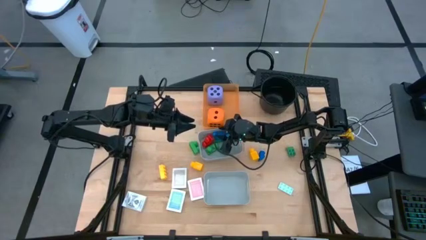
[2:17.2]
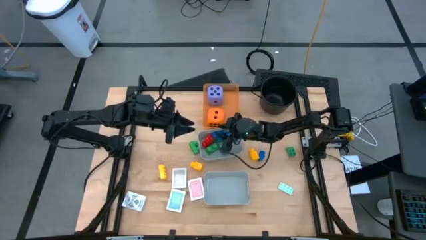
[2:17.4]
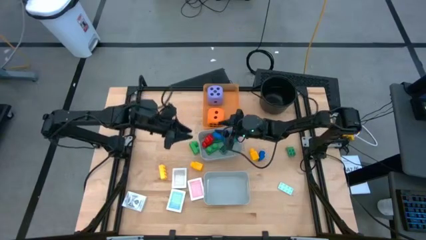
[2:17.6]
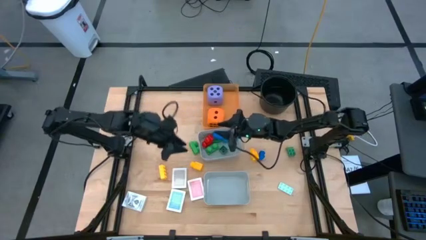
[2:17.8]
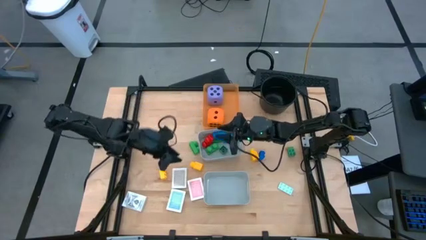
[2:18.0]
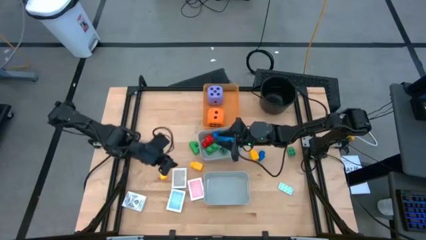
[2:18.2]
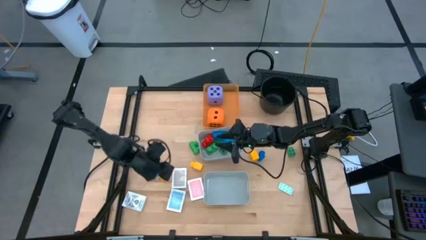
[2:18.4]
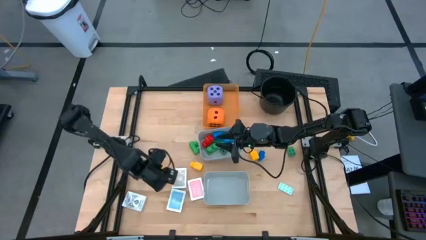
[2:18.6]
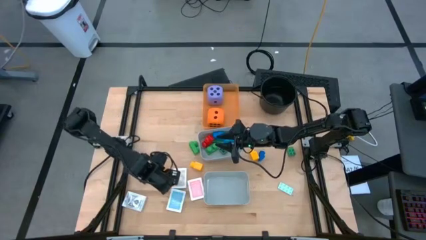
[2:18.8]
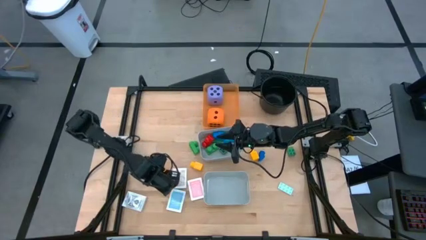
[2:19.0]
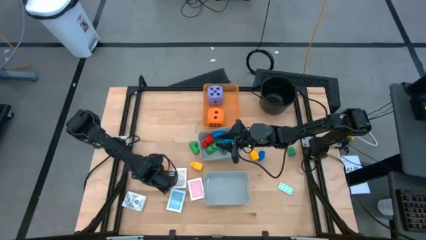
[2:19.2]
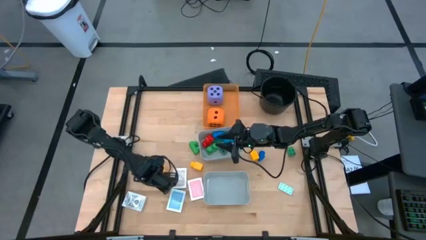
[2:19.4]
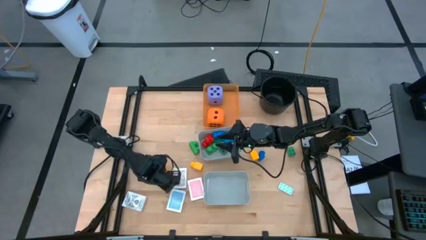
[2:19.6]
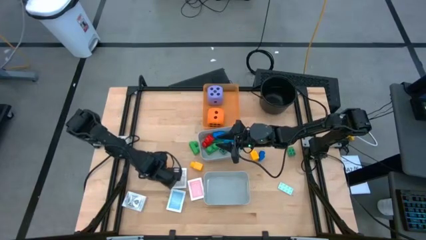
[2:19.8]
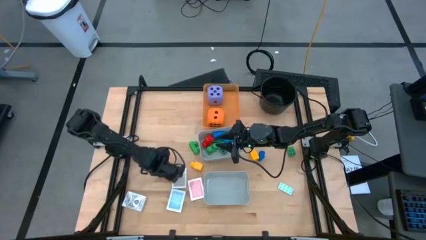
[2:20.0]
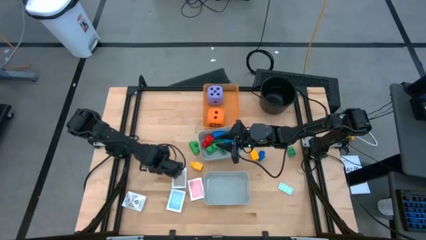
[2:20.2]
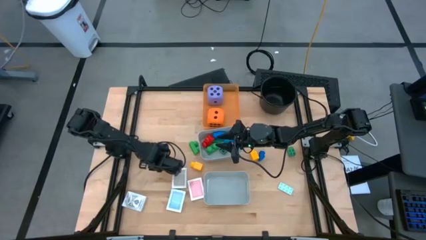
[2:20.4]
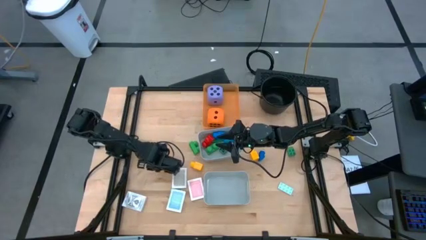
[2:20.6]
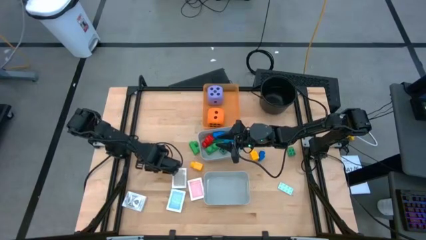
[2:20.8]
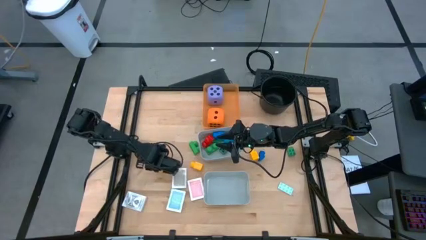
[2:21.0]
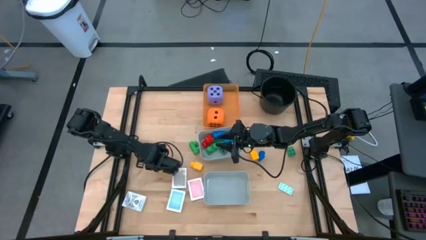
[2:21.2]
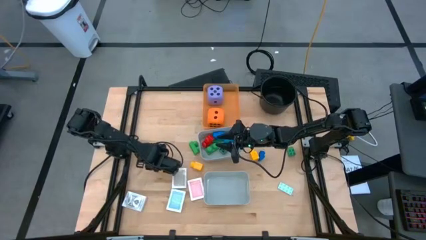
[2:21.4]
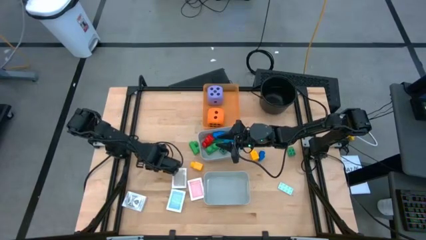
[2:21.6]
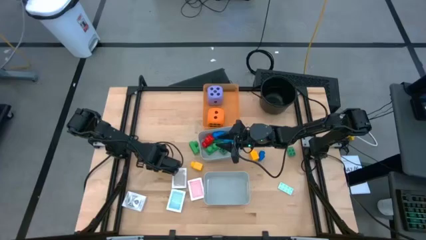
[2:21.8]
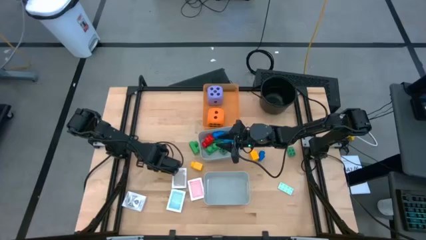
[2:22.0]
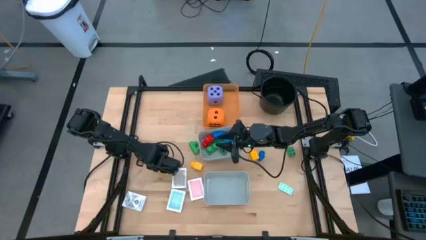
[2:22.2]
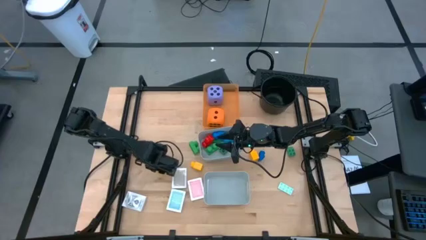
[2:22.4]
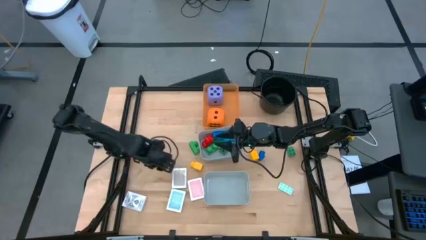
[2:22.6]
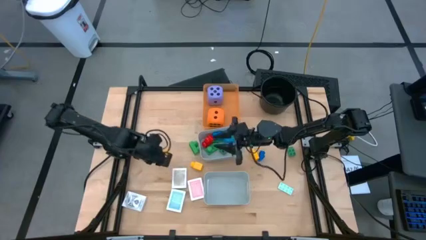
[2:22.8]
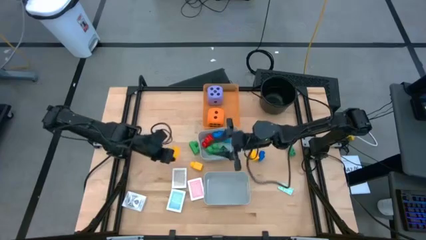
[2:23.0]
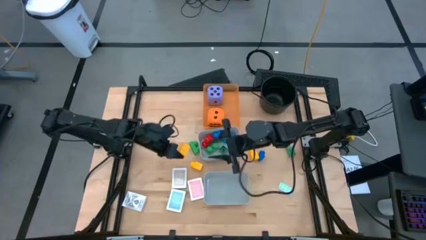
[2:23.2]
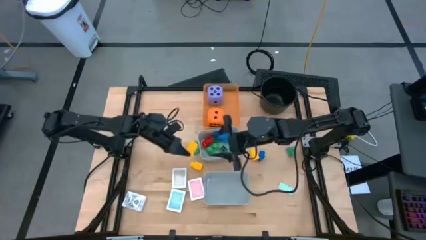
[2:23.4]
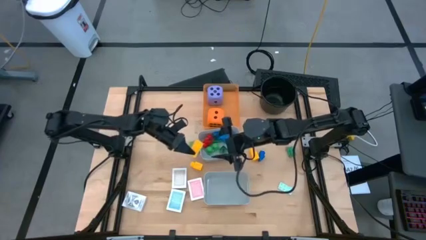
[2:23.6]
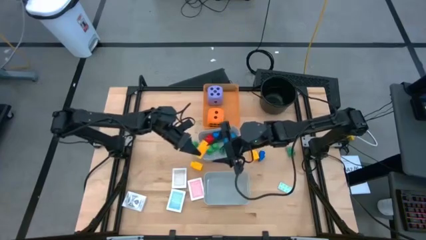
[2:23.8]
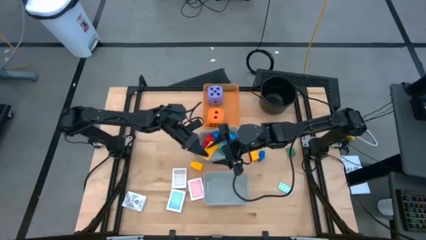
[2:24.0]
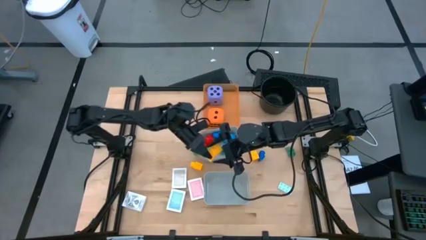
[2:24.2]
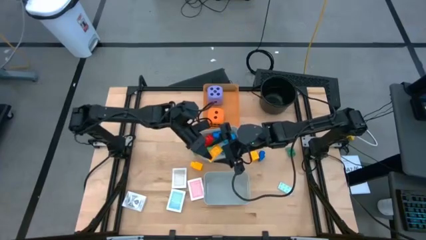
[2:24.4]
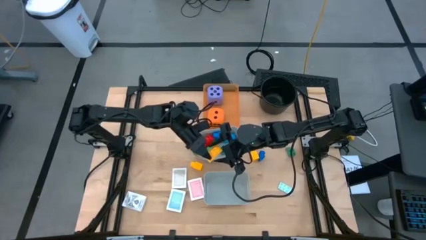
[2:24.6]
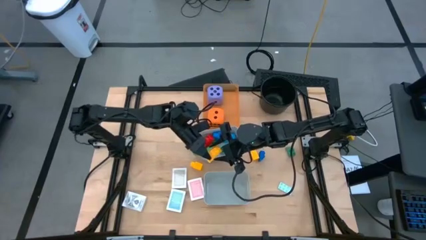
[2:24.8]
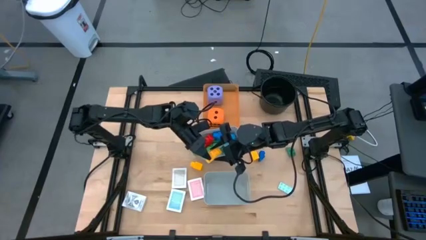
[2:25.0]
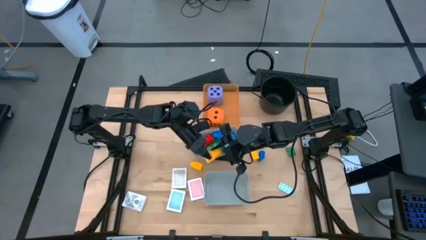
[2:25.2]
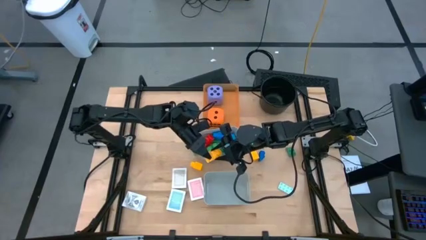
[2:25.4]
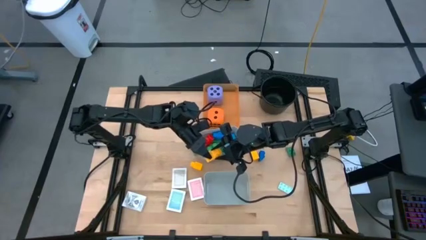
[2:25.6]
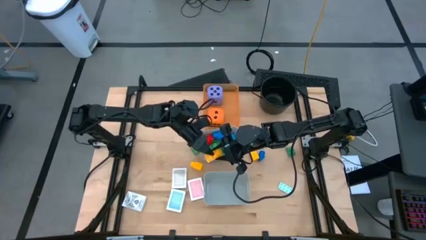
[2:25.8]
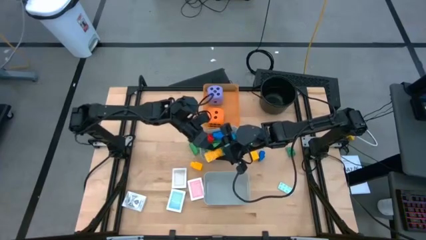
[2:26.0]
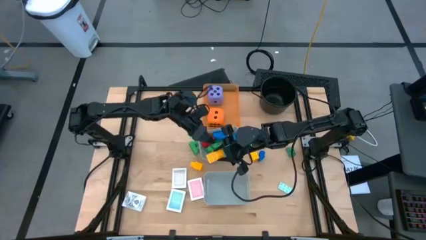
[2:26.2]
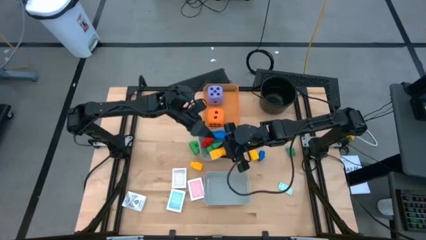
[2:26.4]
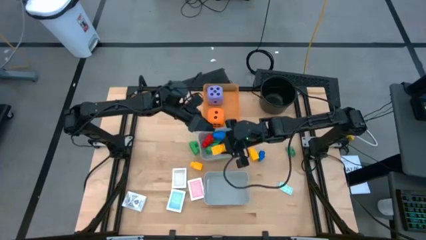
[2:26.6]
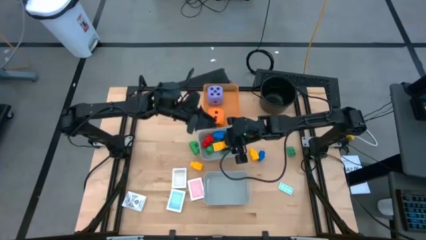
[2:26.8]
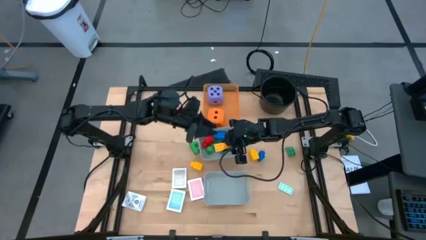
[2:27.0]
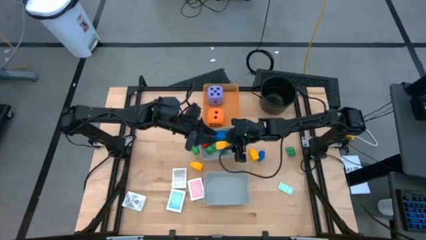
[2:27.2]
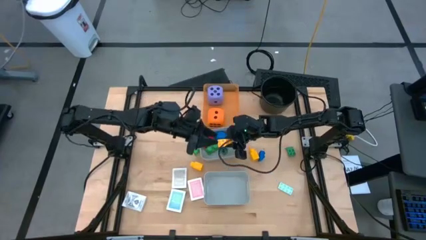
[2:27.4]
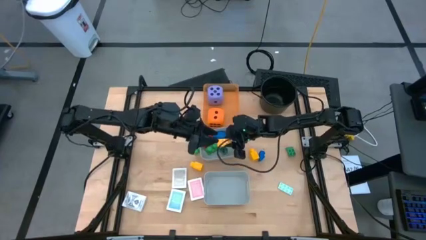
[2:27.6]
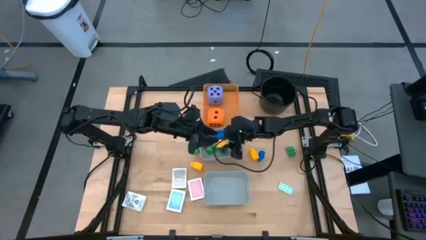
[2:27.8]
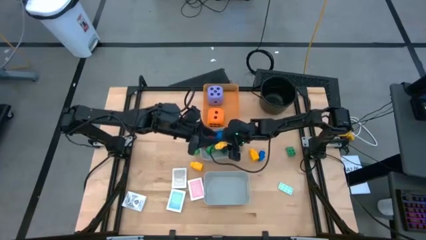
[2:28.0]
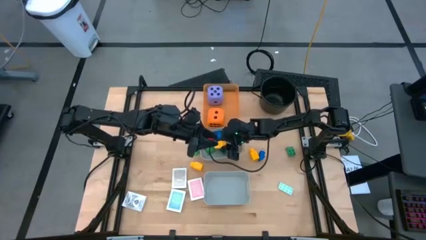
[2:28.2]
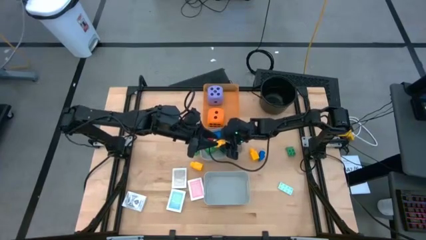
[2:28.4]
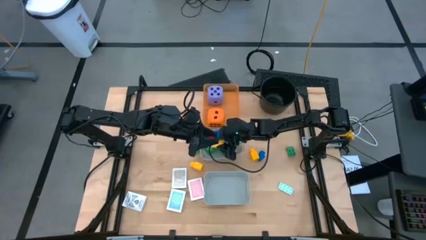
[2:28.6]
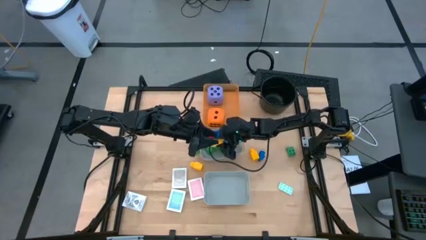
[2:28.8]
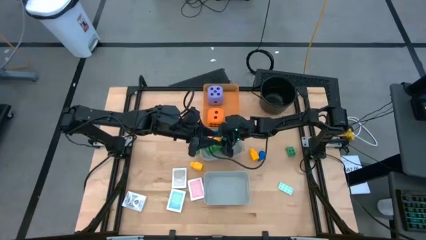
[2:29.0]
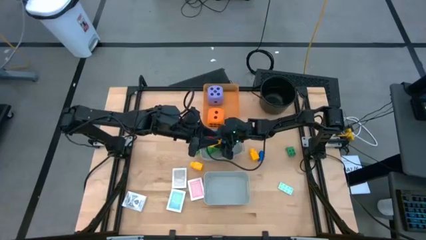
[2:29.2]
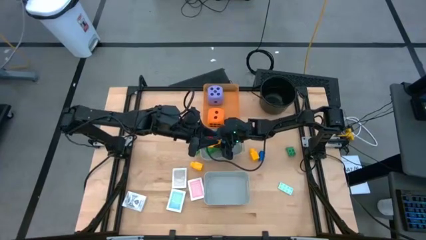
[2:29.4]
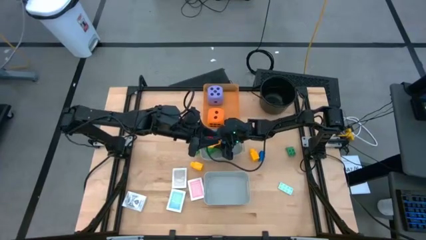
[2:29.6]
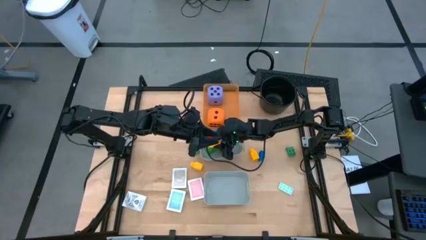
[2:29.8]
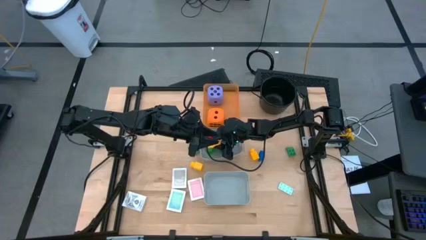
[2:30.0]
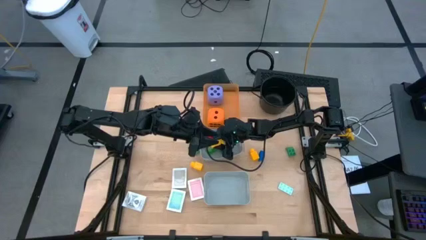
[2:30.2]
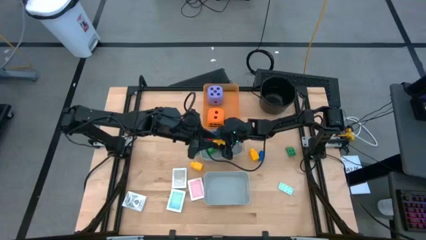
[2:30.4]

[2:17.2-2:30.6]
Task: Pick & Place Toys
Put the left yellow game piece into the top gray bin

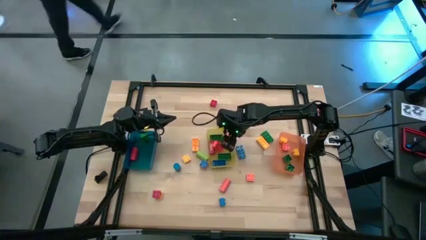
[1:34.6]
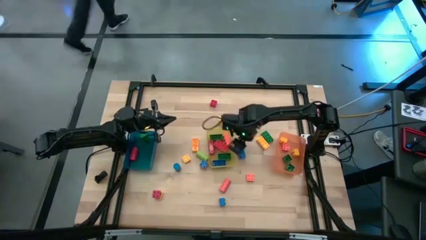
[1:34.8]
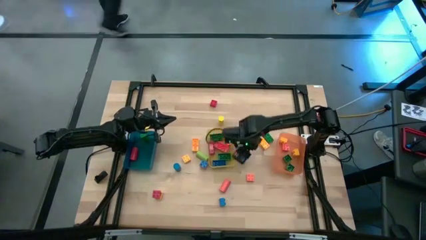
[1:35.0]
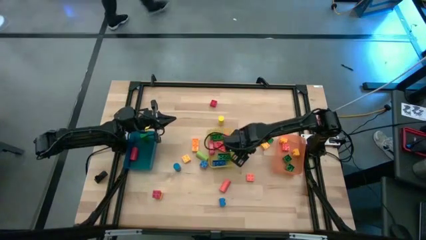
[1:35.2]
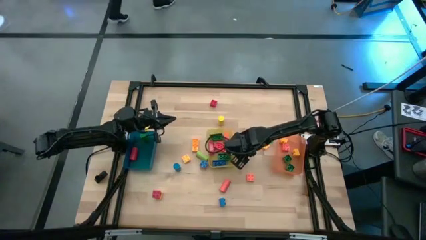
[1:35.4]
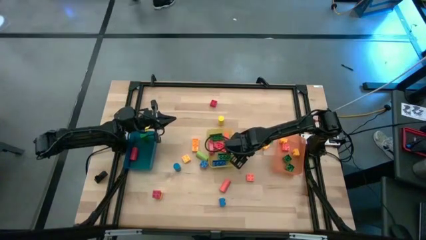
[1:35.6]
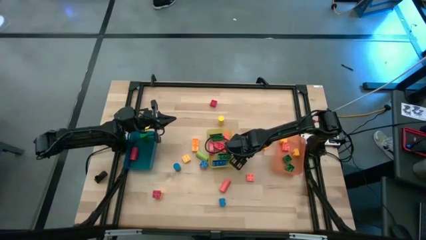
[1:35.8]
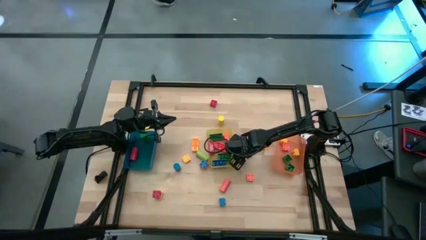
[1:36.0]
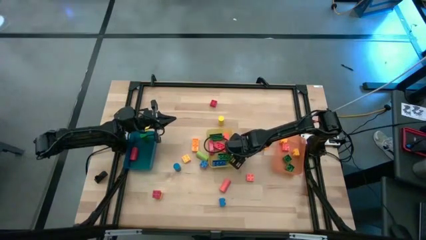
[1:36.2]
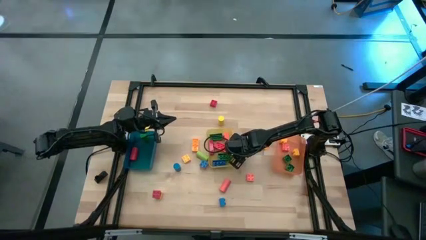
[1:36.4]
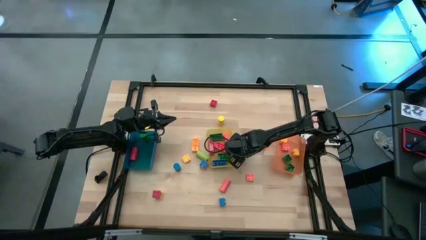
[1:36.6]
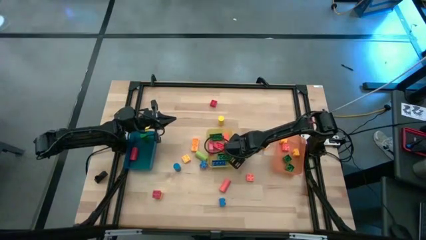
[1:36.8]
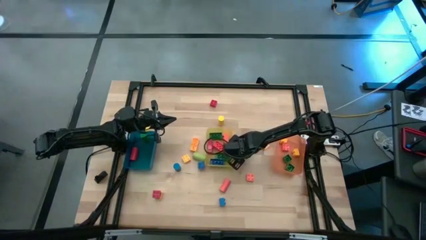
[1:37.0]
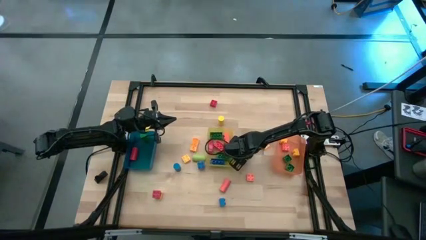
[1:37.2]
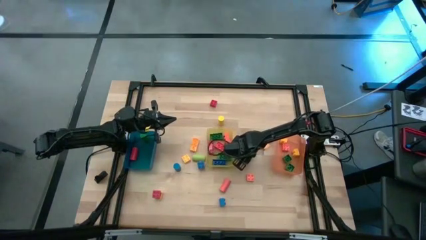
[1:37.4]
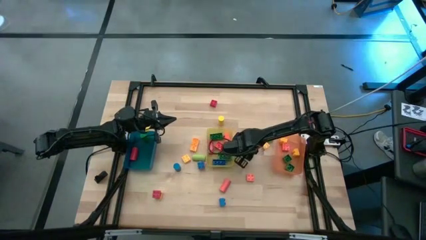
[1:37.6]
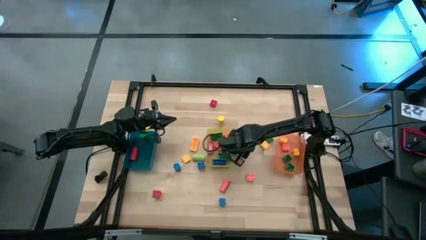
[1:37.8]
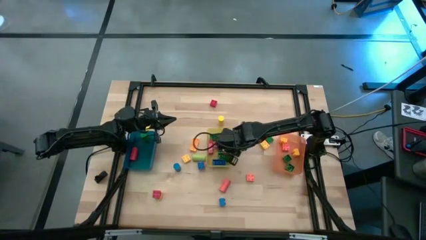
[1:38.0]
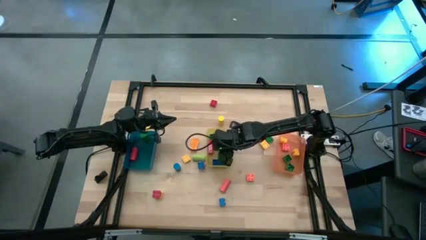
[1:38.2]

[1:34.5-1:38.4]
Task: Sort blocks by size
Put the blue 8 stud game piece into the yellow bin
